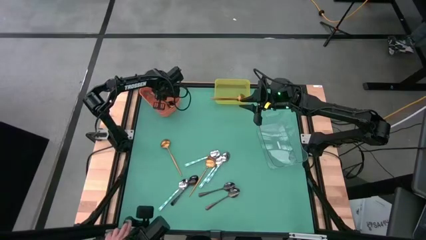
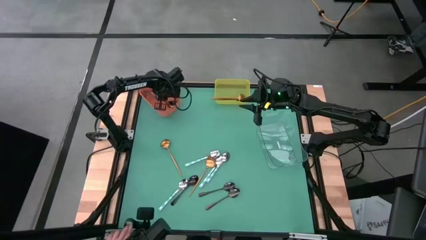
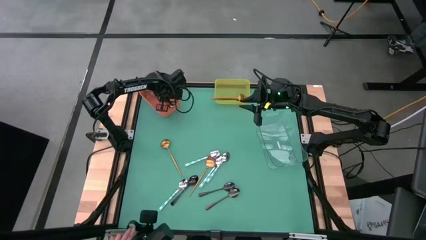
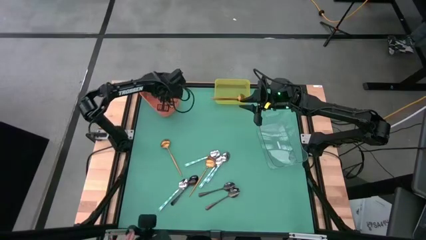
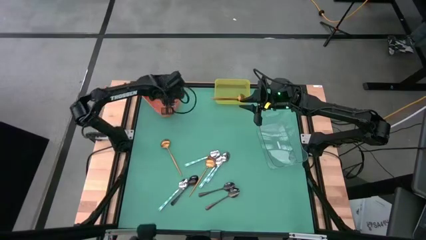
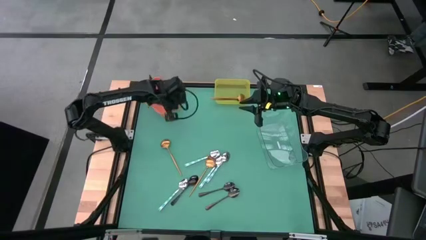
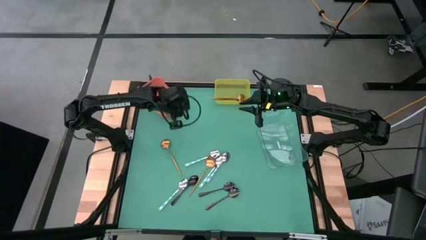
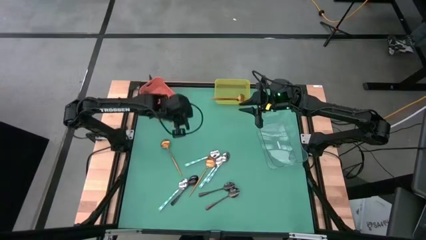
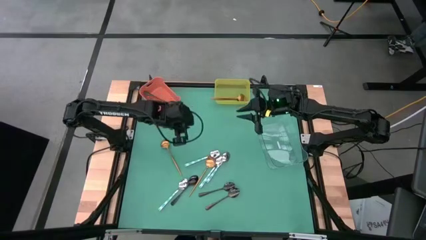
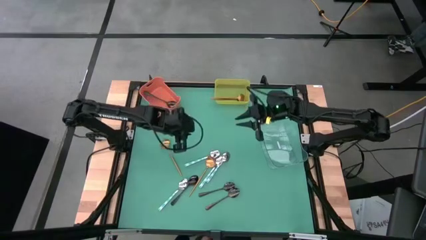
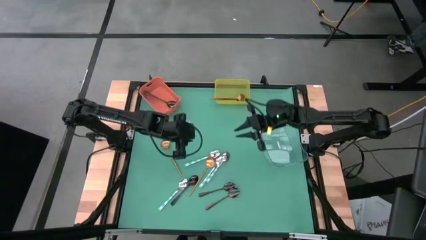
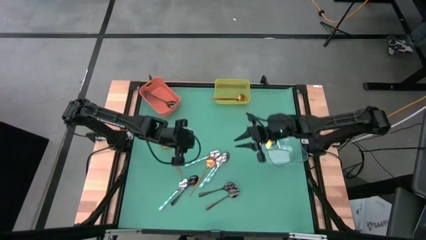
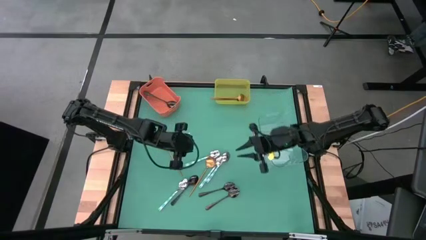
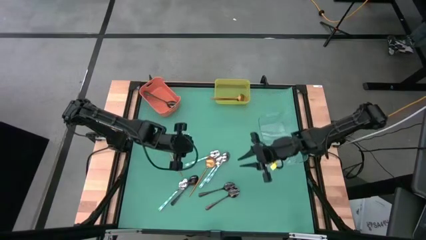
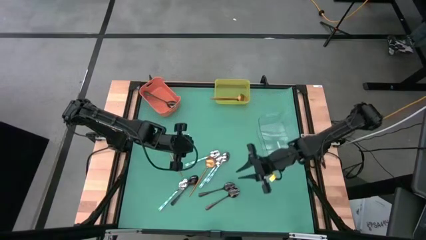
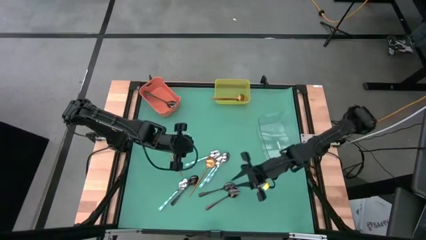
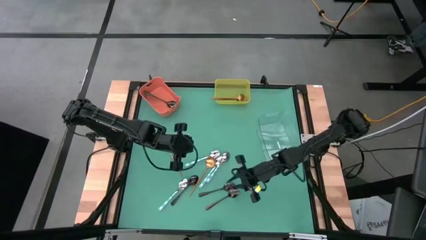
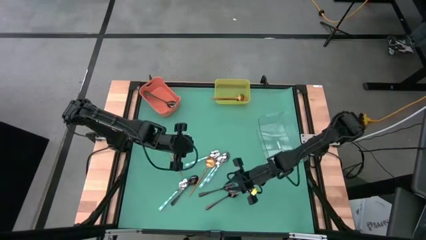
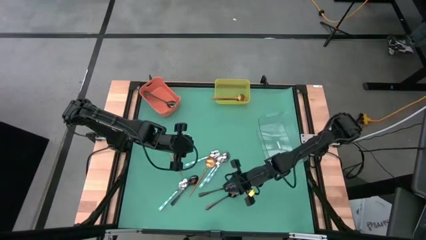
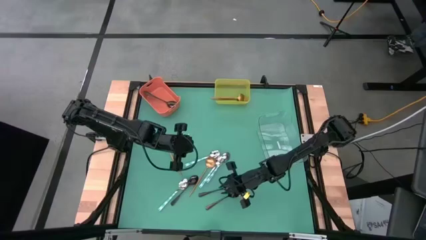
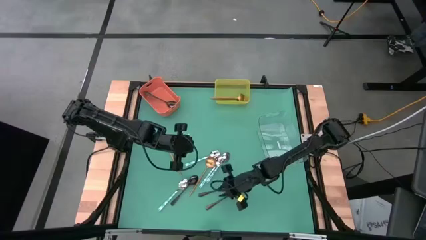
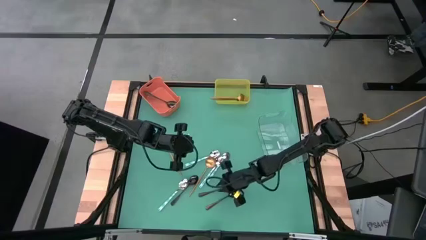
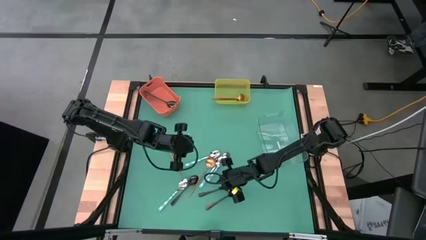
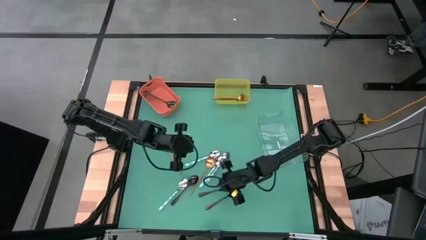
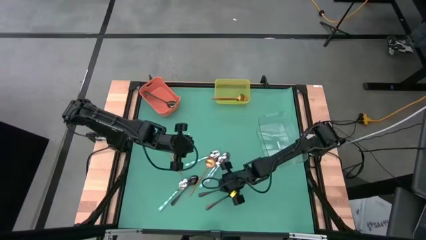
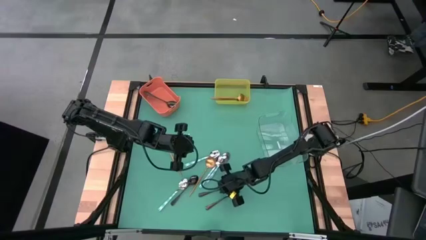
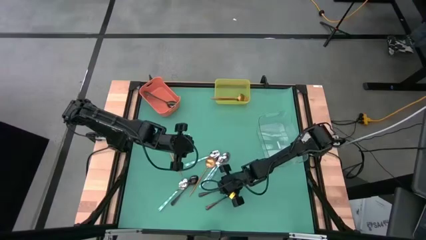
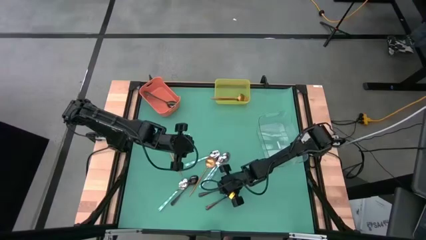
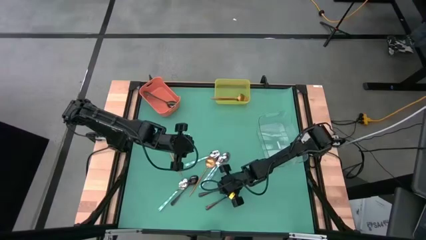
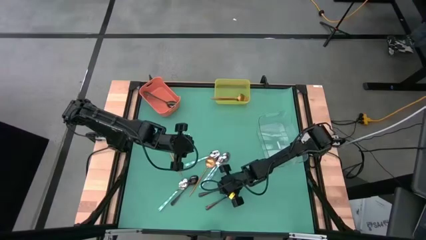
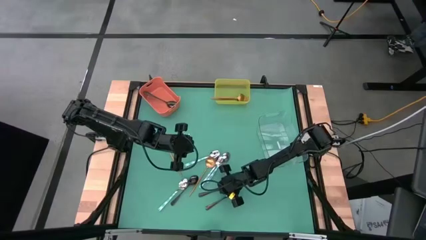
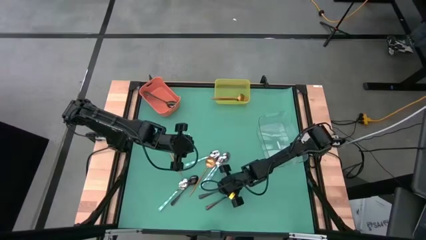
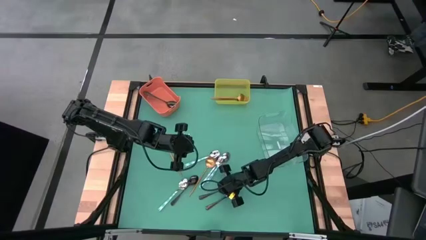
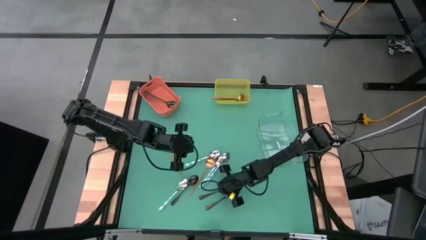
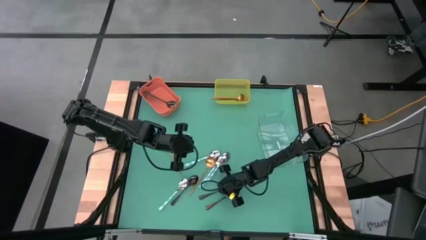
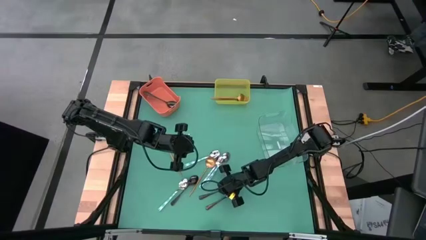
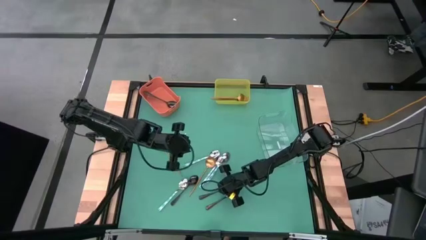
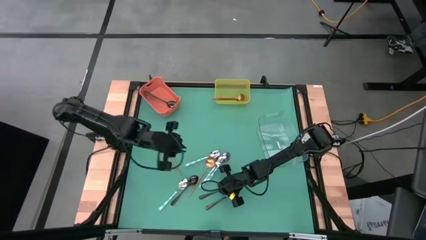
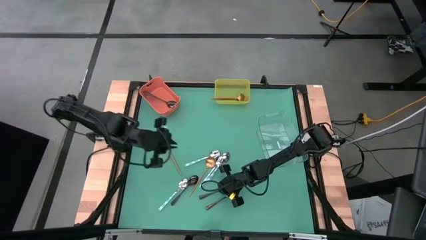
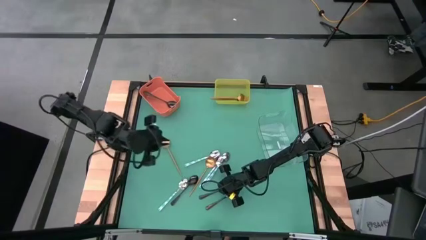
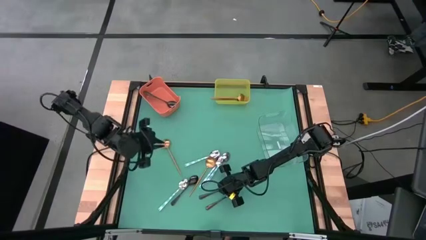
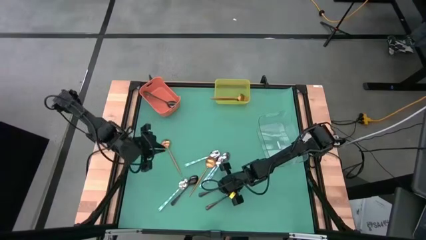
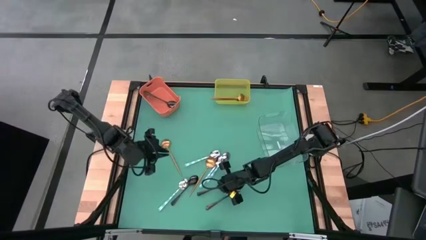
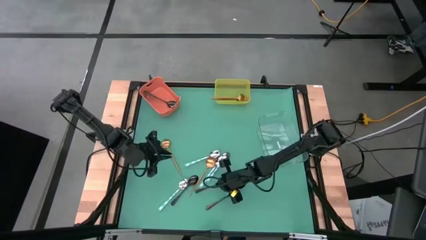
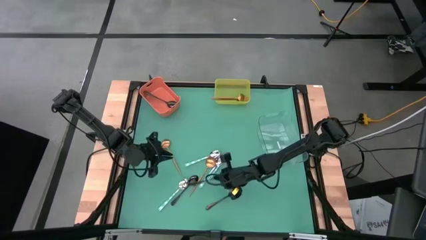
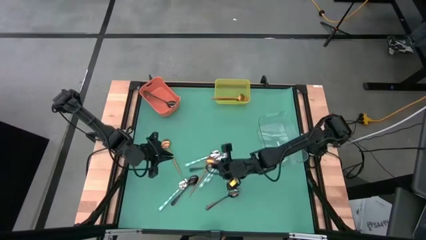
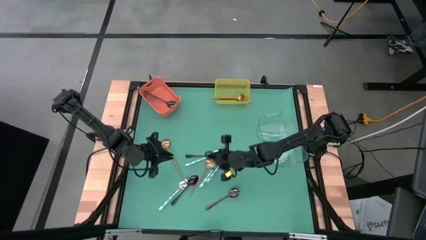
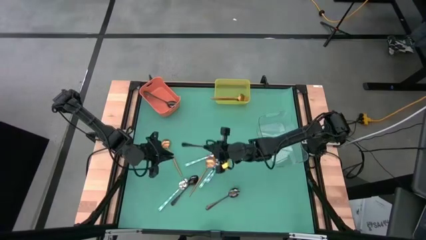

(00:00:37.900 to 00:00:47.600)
Task: Sort silverware by color (type)
Put the black spoon into the orange bin

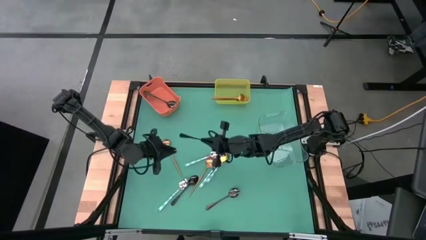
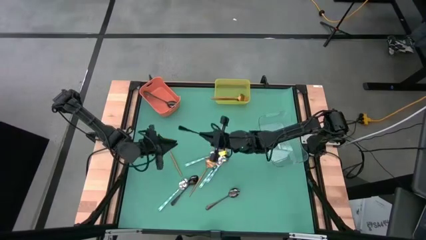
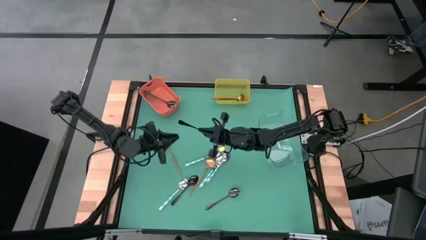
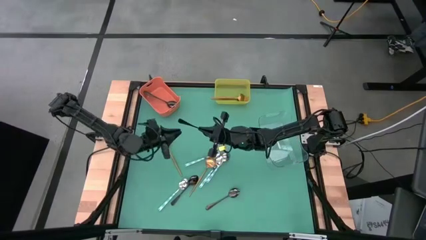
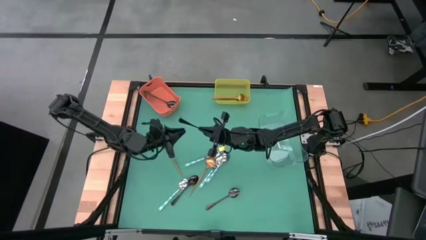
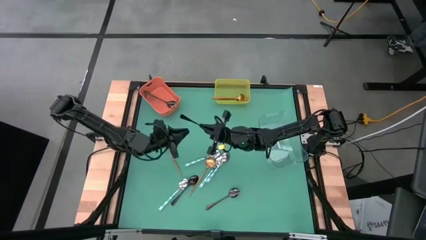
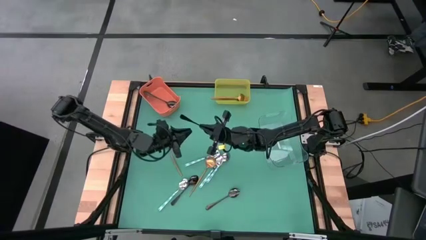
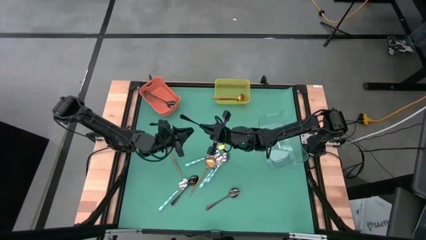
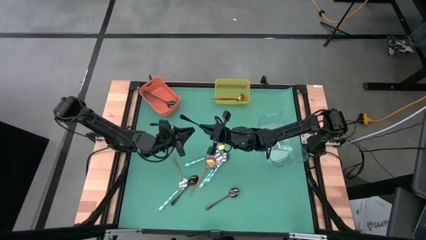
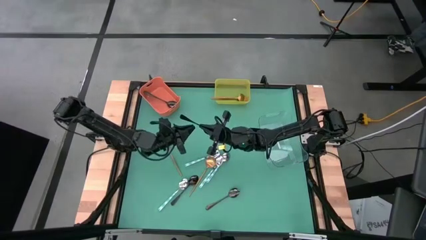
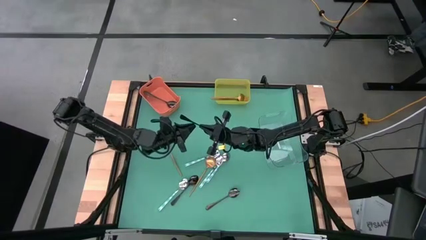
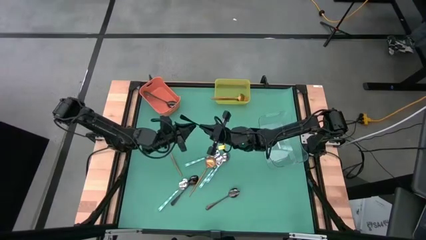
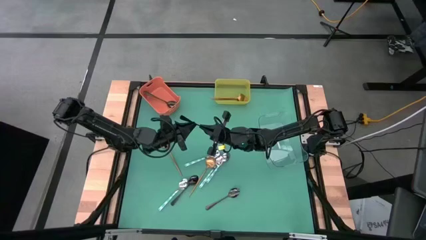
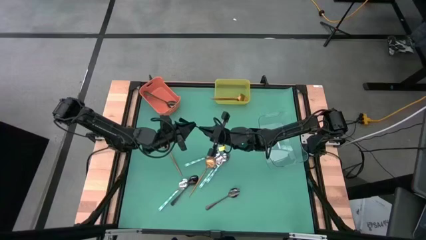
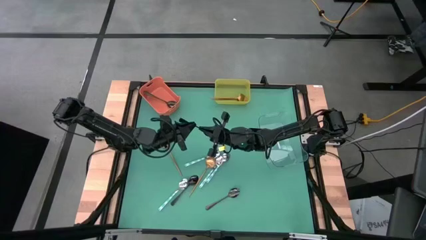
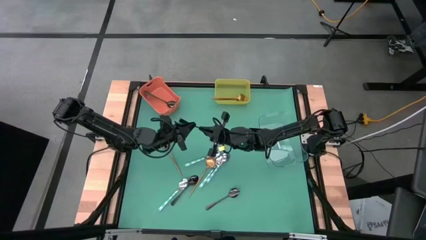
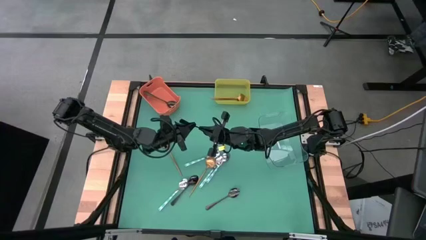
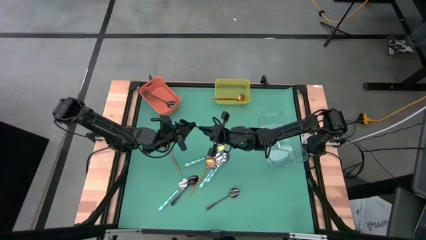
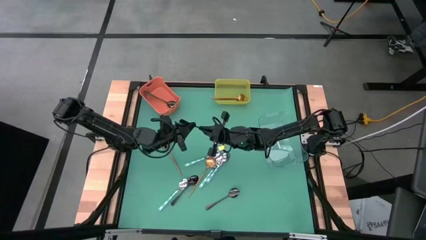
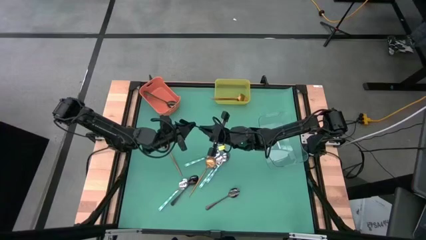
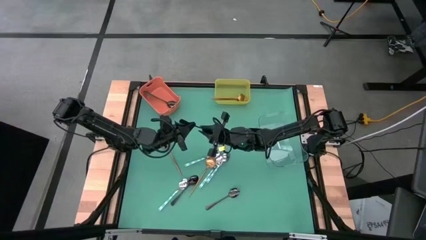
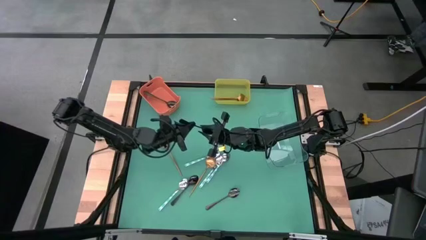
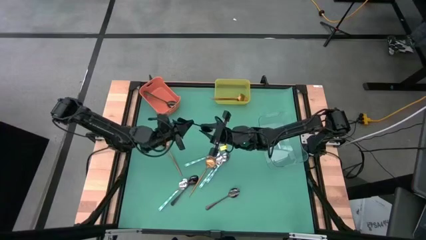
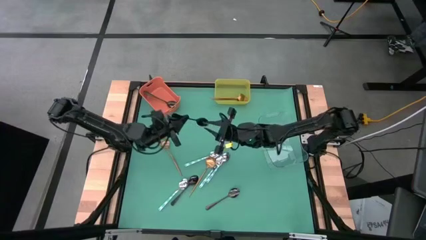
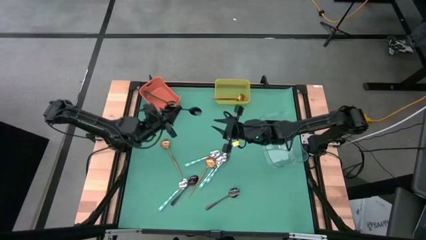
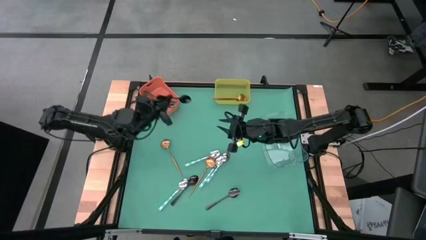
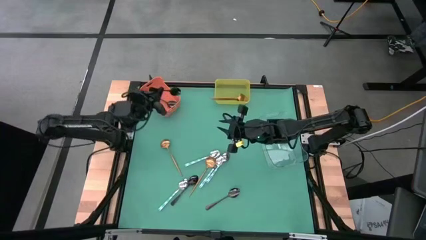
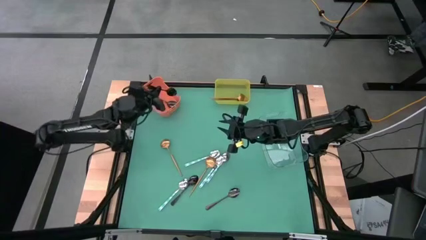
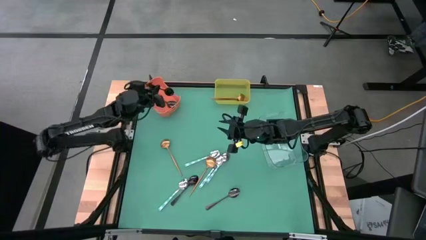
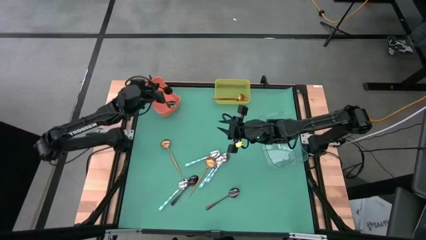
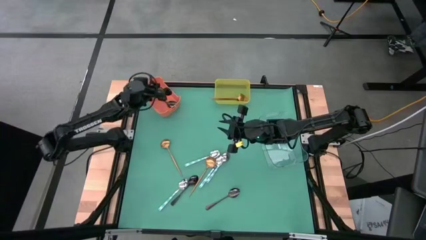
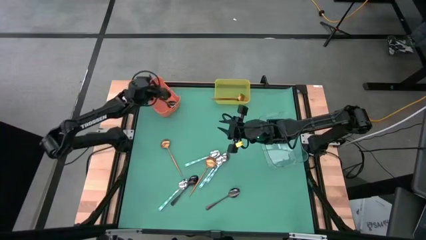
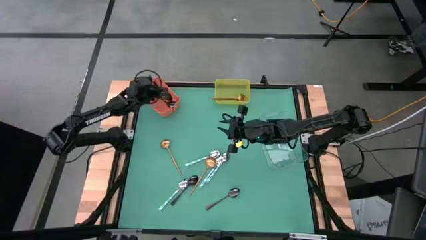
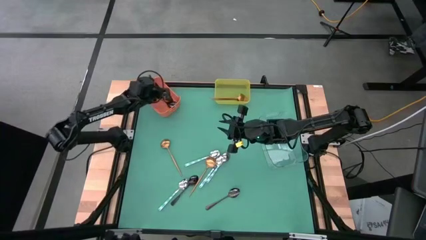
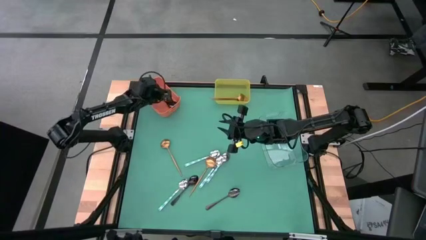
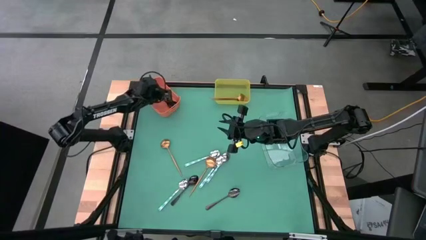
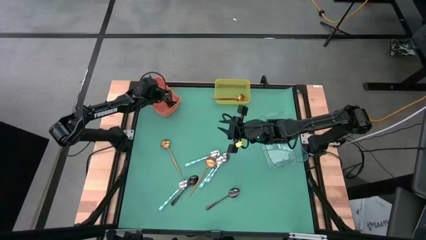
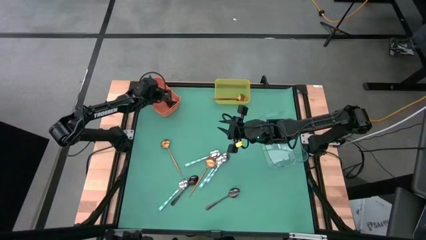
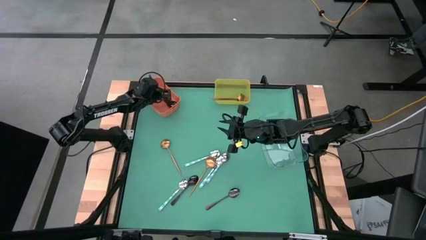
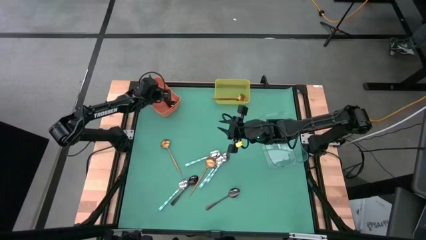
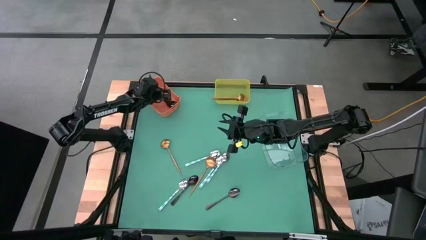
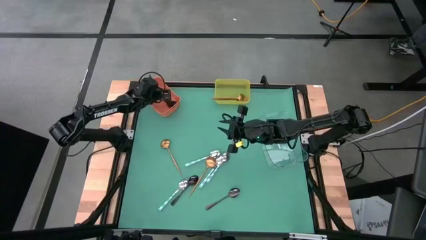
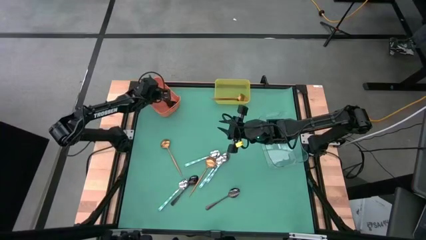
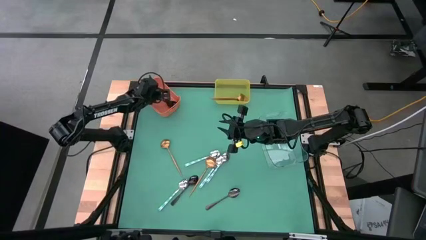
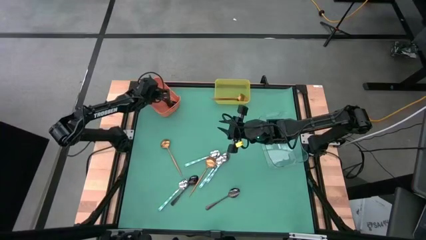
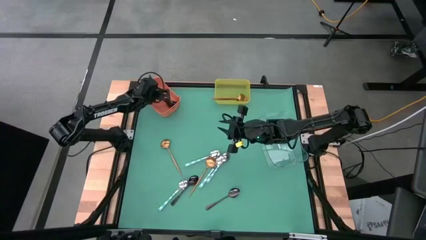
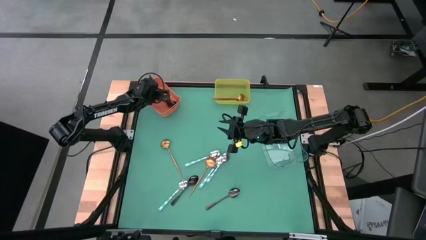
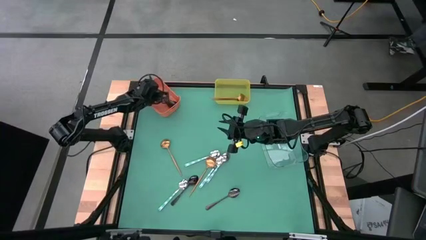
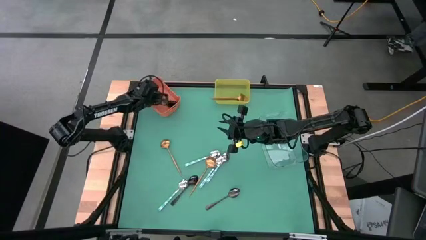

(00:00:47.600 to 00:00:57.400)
Put the black spoon into the orange bin
